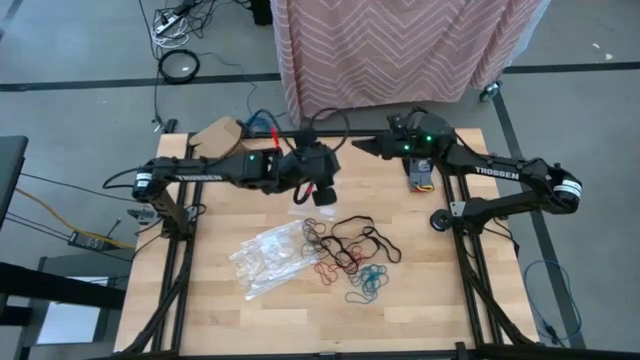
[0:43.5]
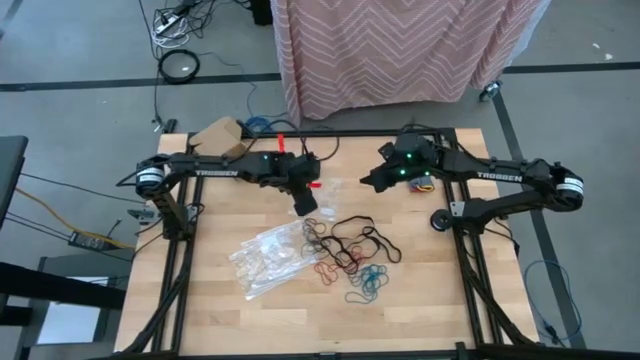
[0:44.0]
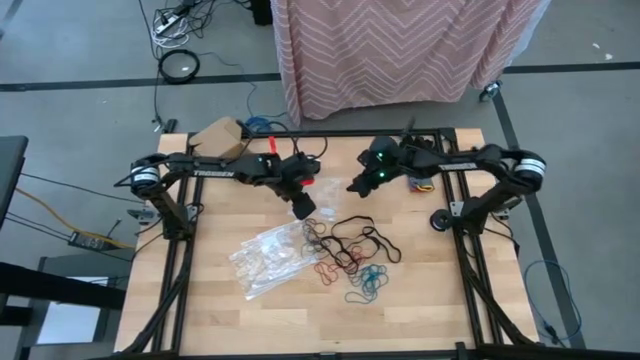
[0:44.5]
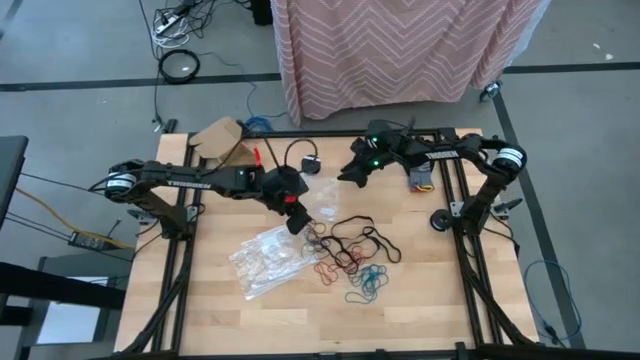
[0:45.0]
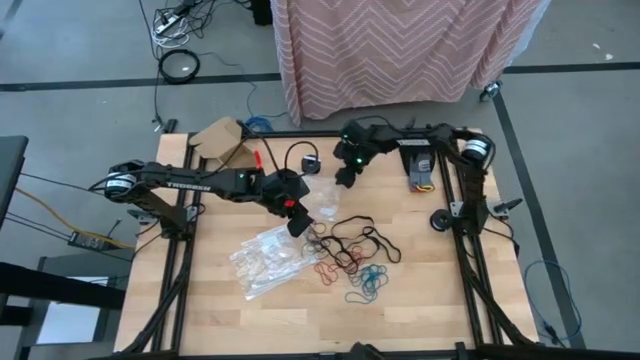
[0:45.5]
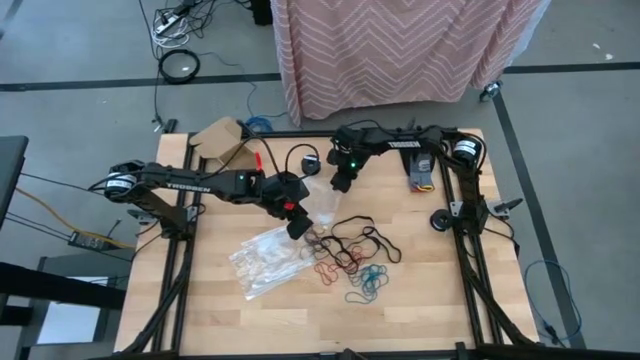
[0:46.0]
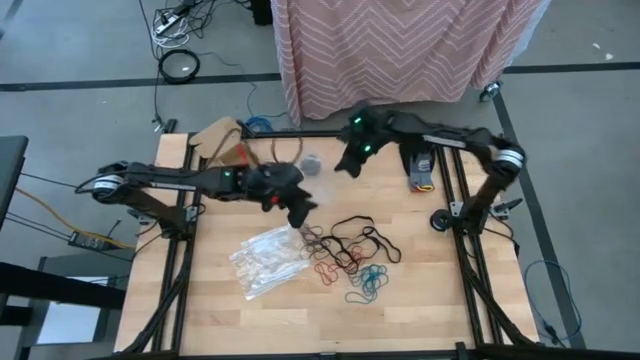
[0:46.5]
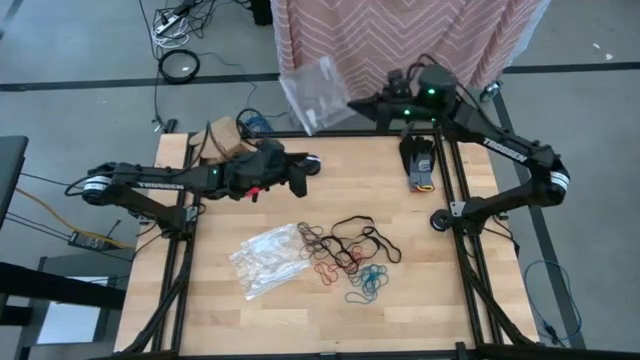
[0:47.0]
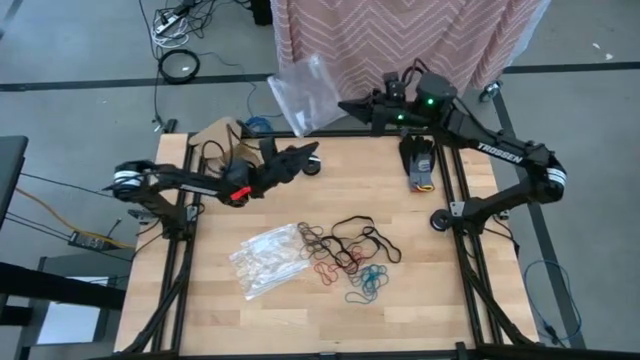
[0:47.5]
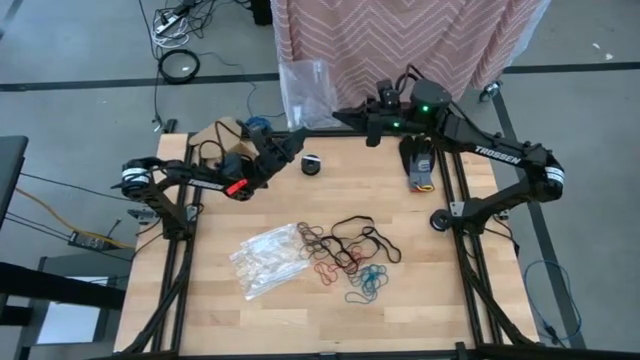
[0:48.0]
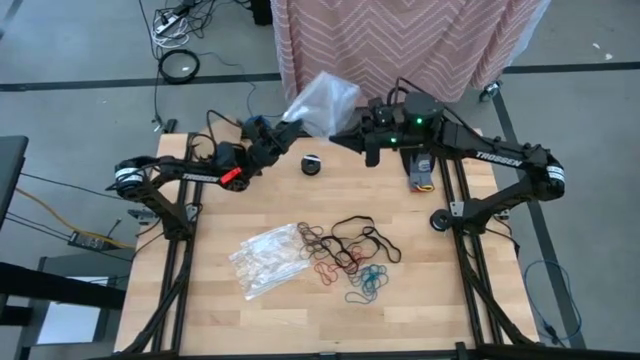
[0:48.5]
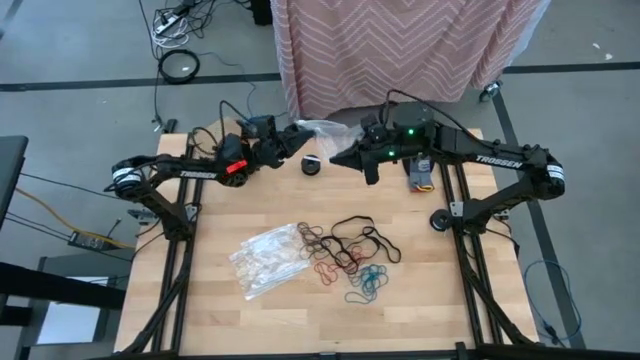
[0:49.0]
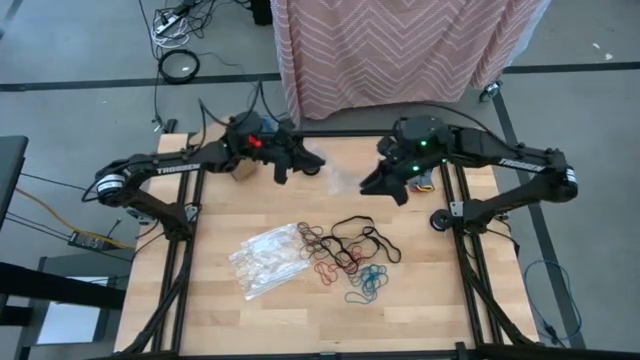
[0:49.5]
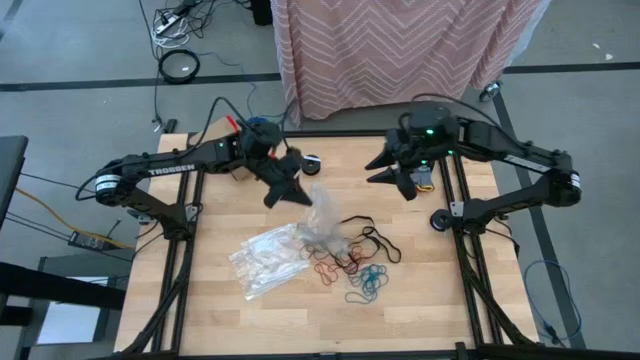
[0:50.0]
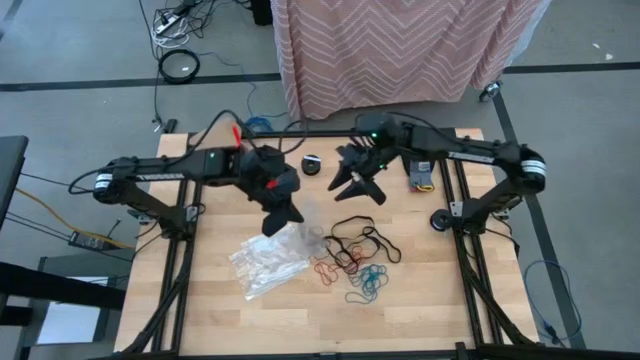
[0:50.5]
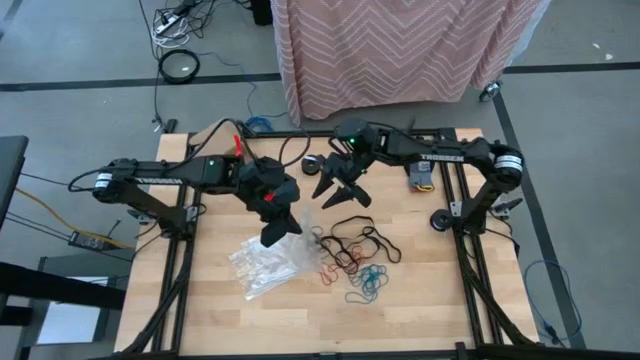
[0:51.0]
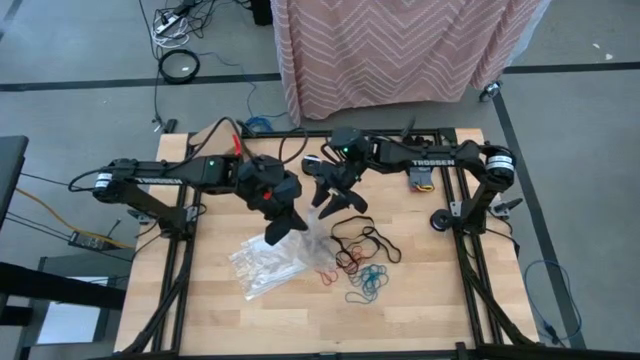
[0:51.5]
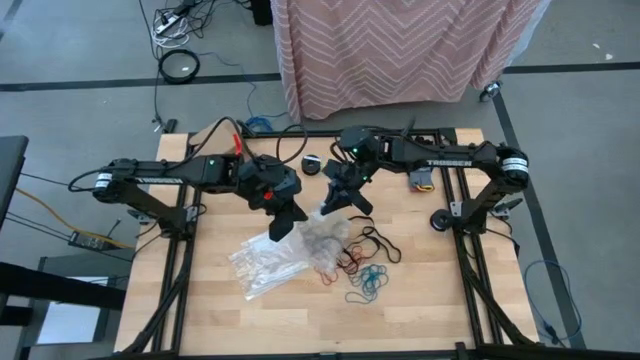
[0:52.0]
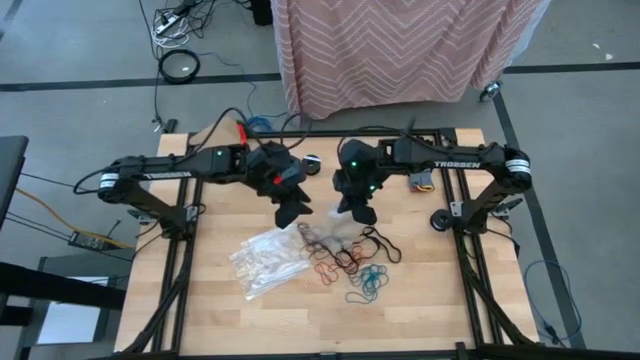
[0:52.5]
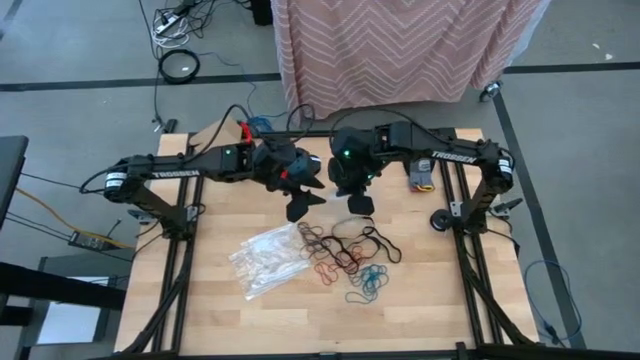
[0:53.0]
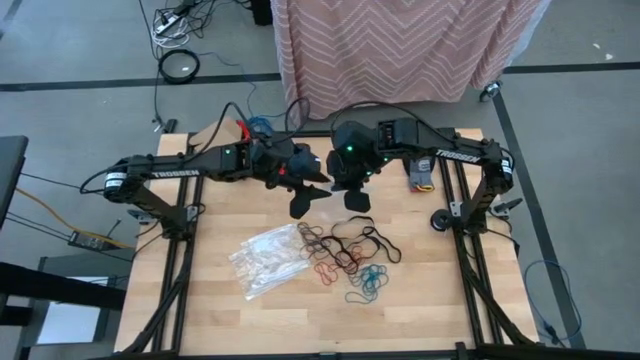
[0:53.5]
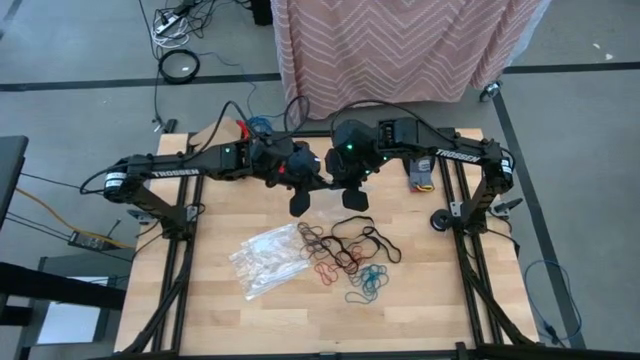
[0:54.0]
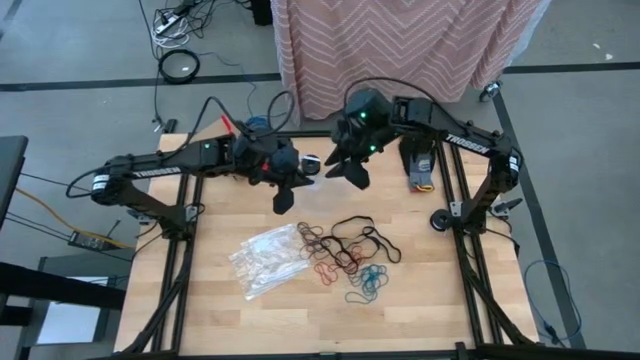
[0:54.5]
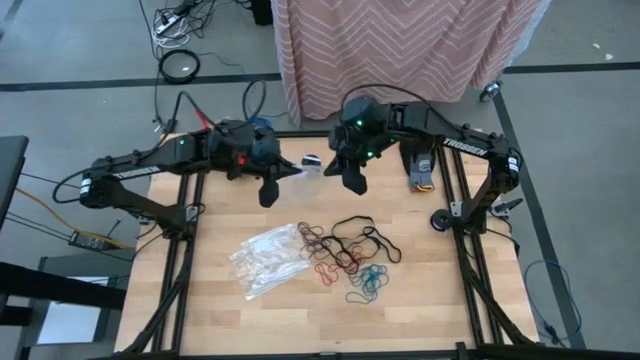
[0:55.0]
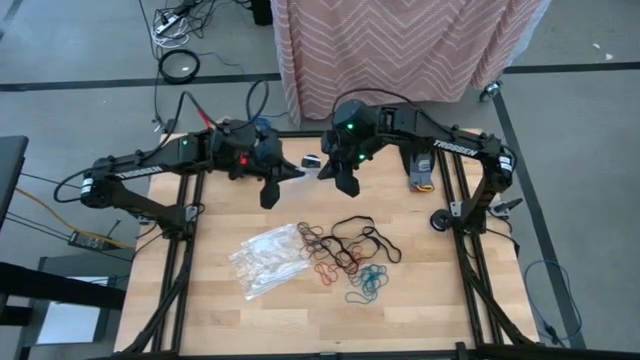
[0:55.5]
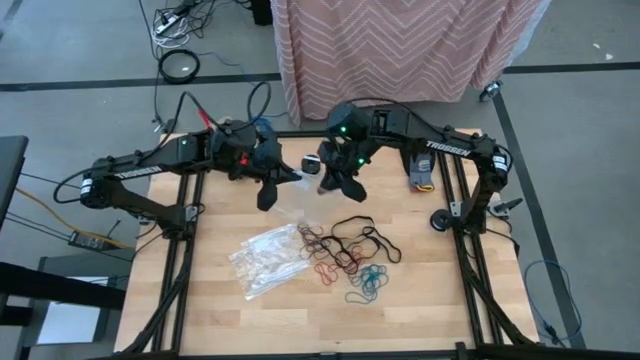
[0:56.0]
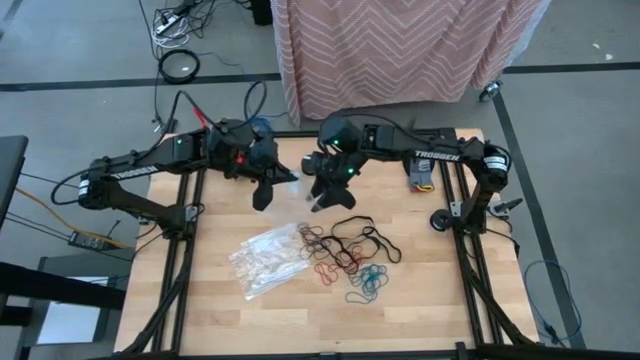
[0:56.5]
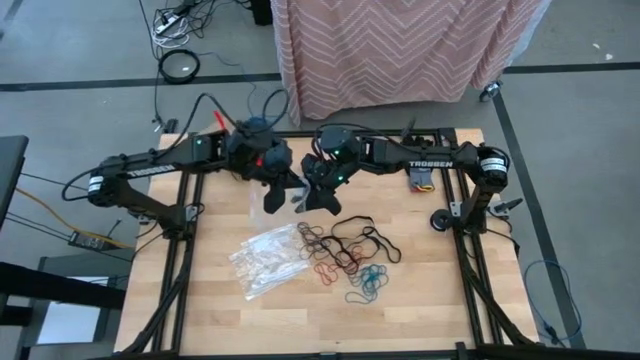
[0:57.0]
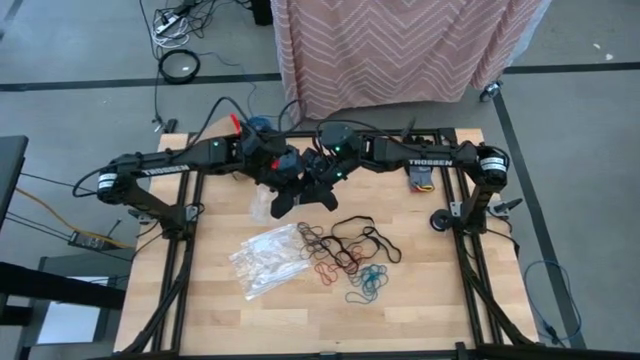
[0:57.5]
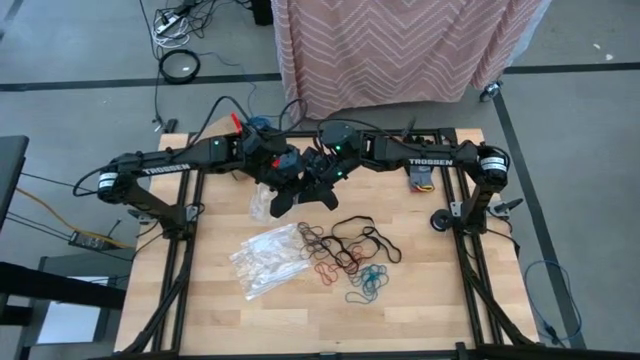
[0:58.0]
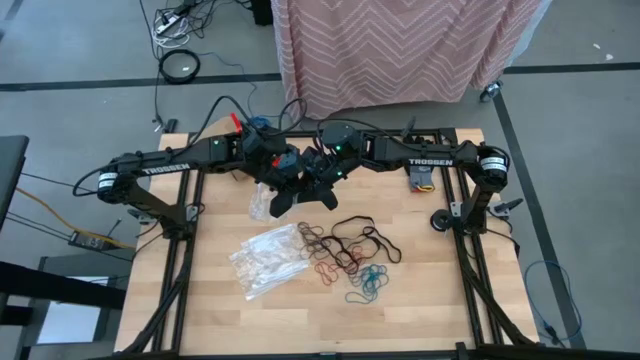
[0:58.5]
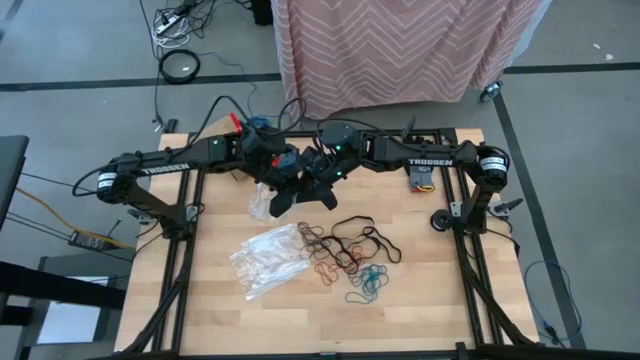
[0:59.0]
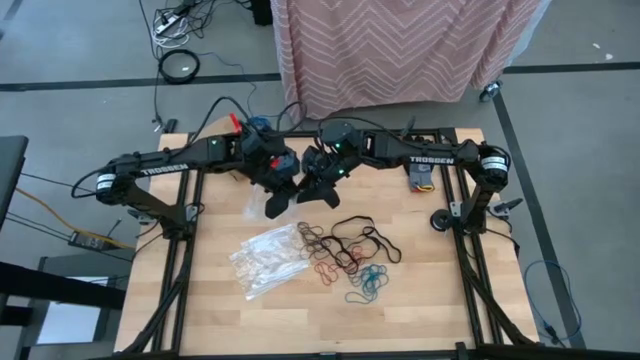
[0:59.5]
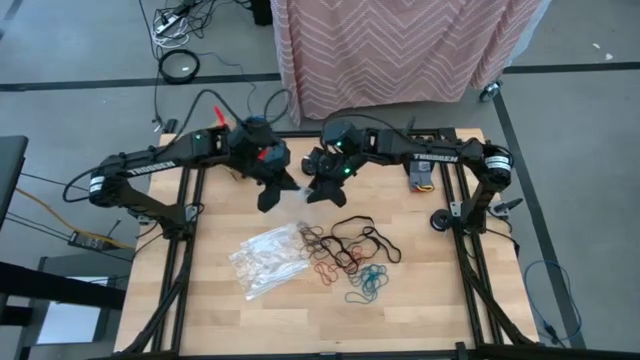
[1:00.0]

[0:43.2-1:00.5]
Task: Sort rubber bands
Open the transparent zip bag

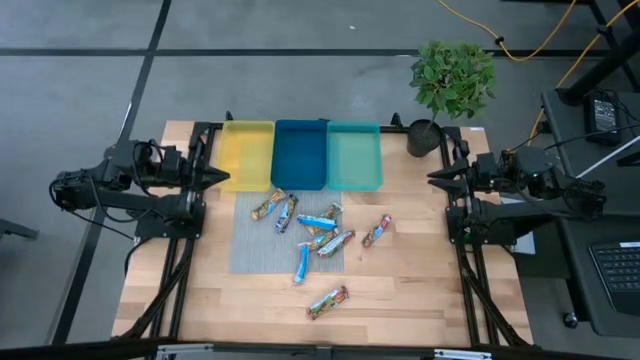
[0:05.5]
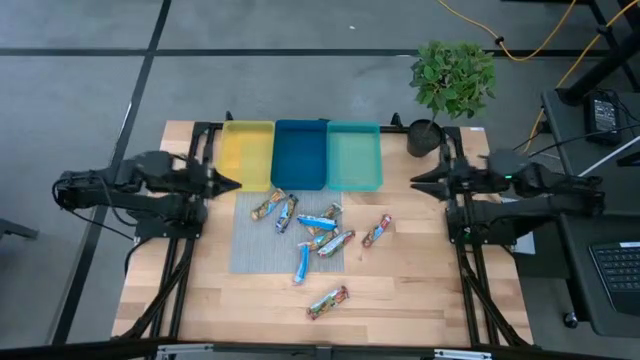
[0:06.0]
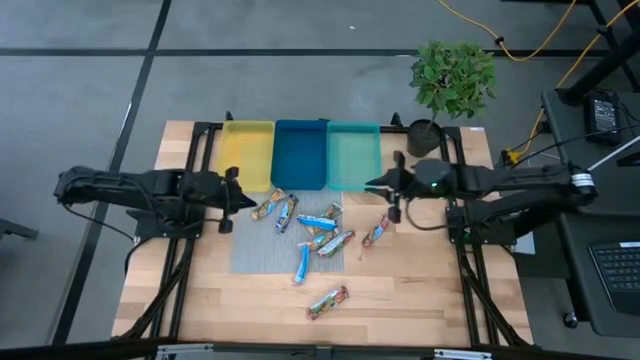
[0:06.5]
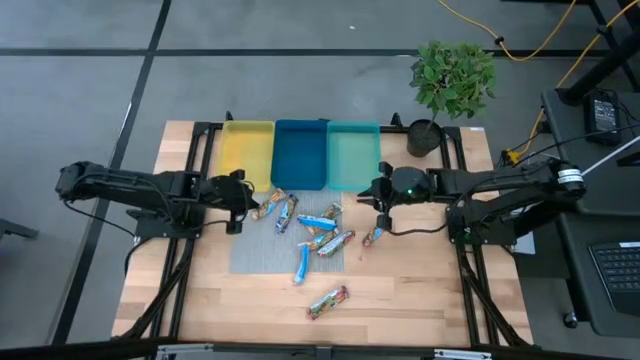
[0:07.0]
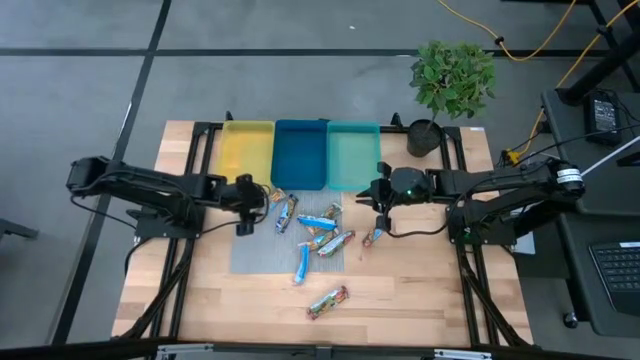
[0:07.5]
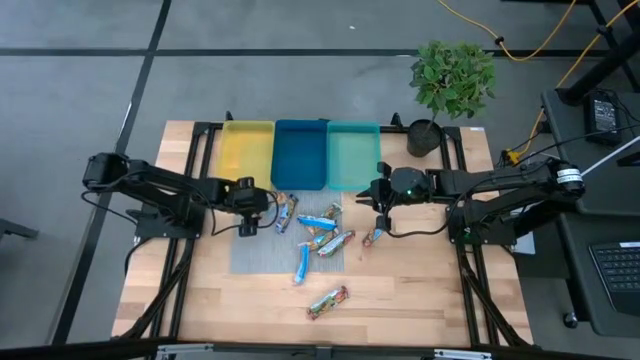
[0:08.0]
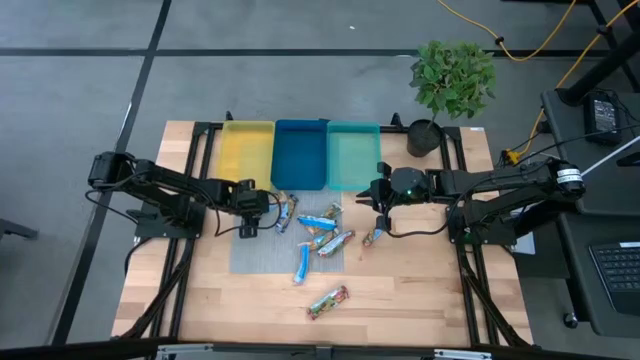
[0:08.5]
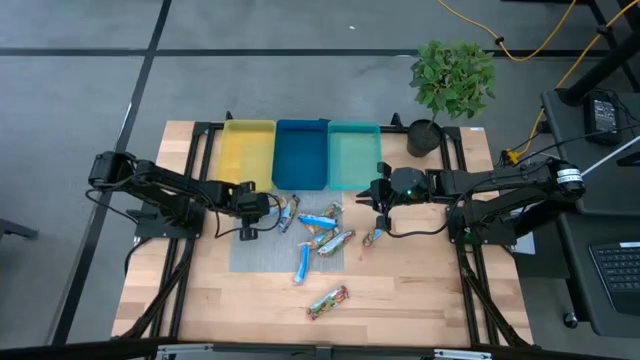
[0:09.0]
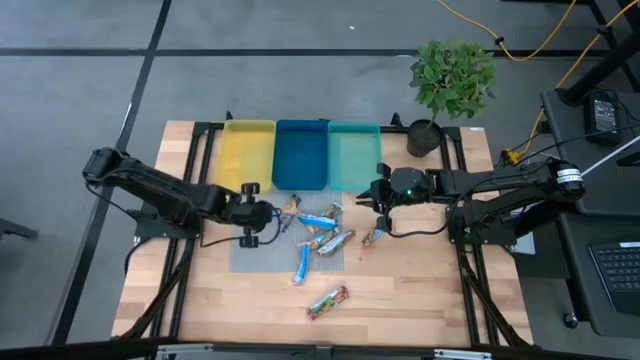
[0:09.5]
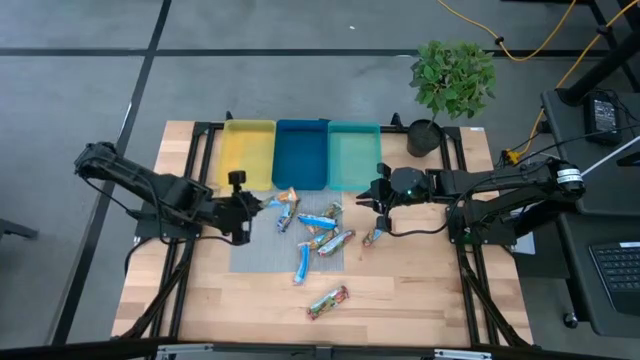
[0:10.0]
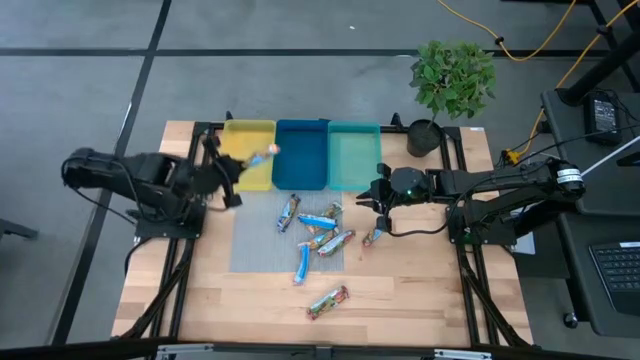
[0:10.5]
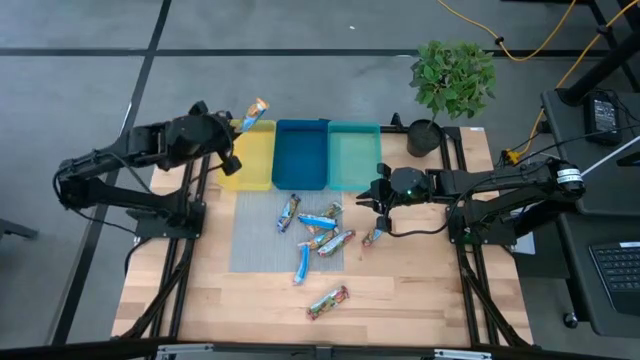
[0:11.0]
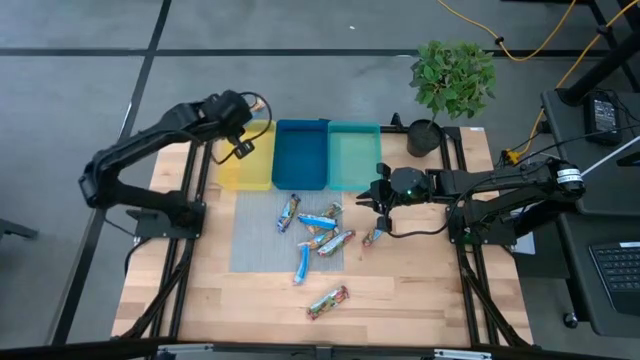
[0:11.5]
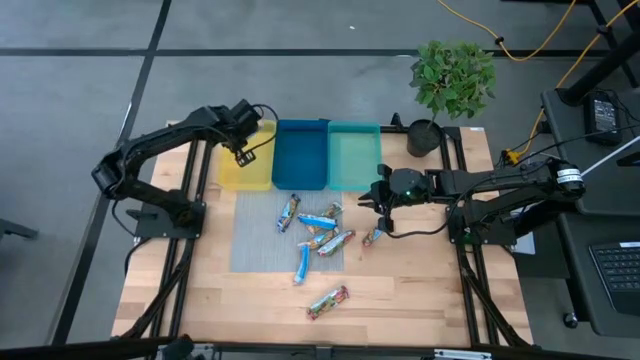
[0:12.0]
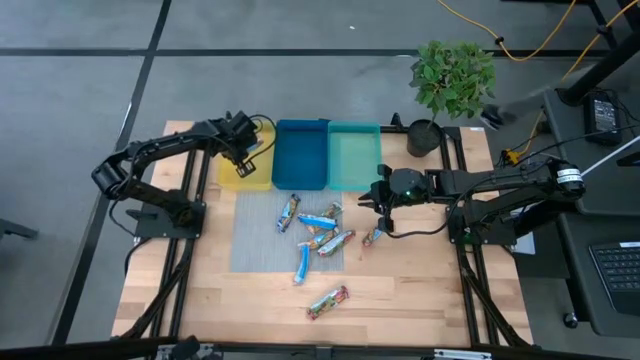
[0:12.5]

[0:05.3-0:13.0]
Task: Pick and place Granola Bars by type
Put the top orange granola bar into the yellow bin
